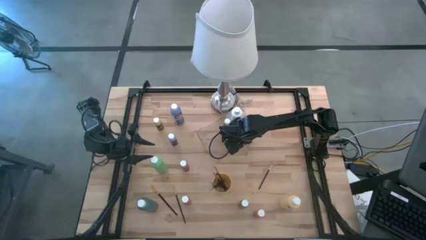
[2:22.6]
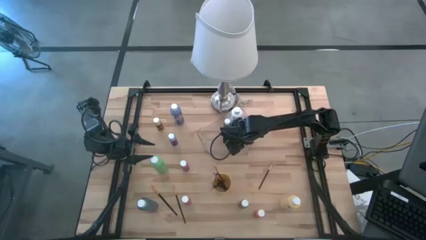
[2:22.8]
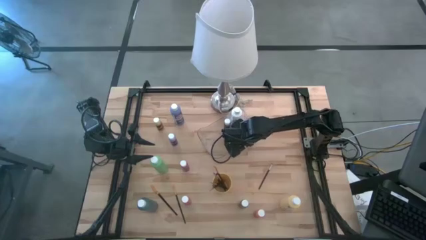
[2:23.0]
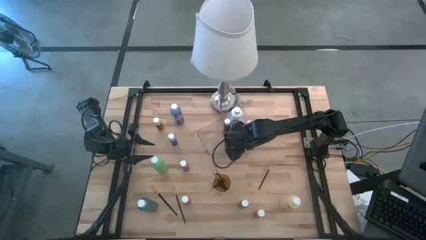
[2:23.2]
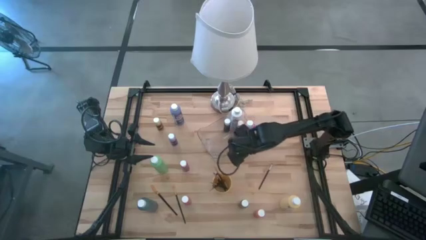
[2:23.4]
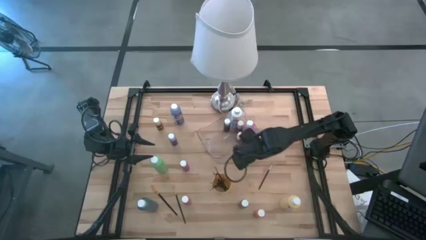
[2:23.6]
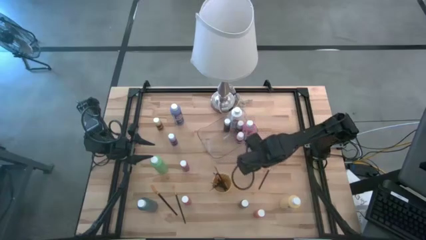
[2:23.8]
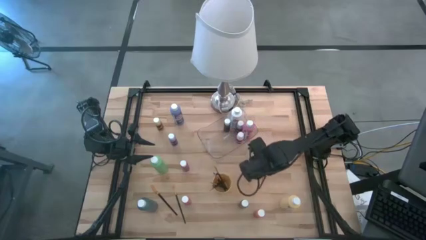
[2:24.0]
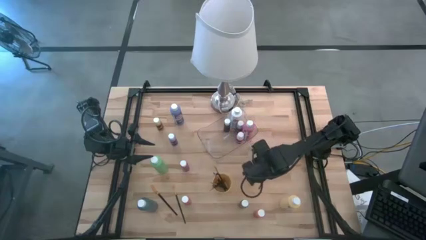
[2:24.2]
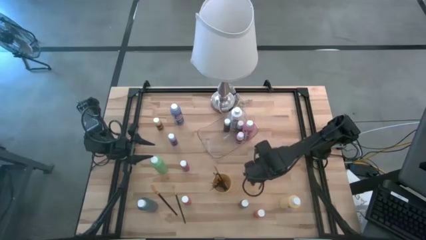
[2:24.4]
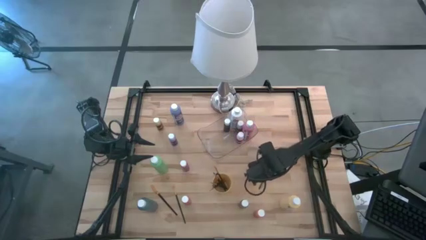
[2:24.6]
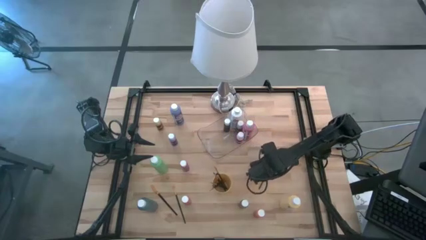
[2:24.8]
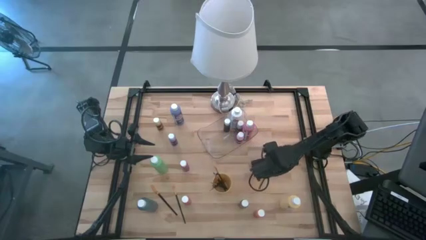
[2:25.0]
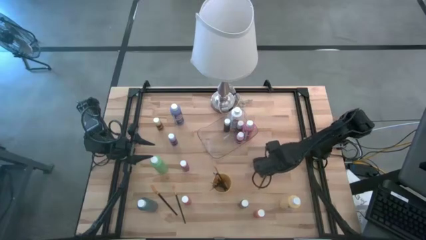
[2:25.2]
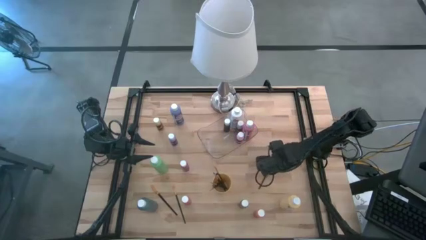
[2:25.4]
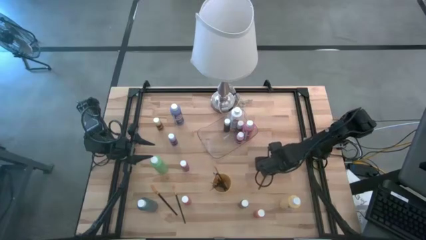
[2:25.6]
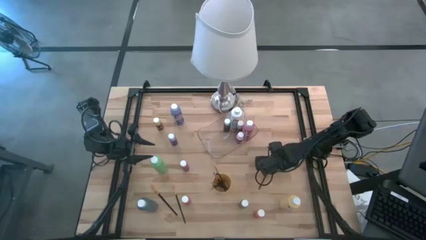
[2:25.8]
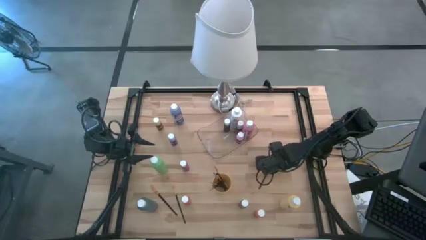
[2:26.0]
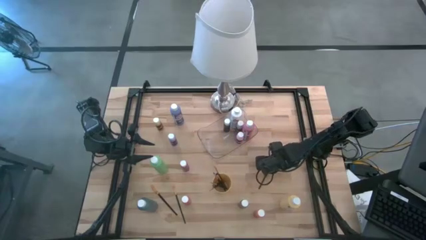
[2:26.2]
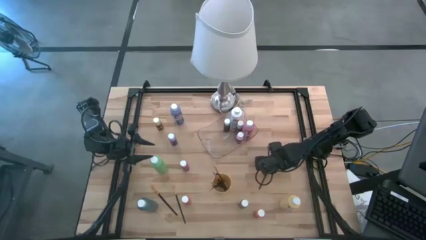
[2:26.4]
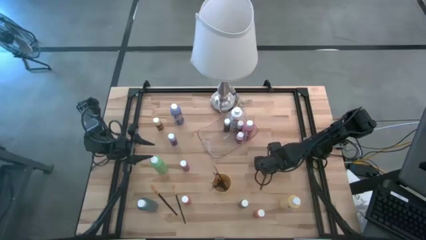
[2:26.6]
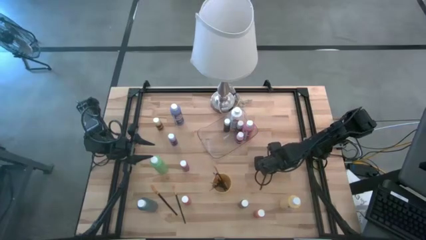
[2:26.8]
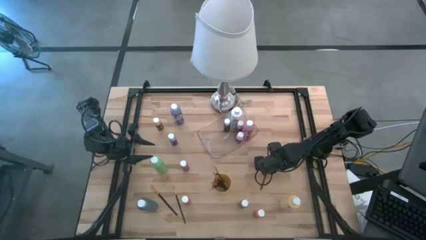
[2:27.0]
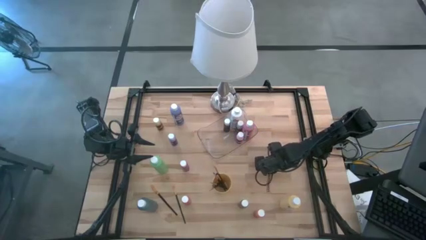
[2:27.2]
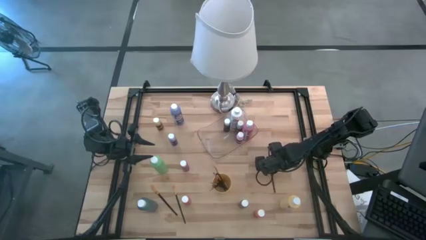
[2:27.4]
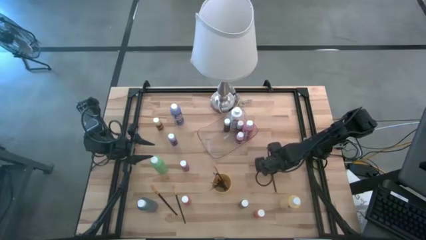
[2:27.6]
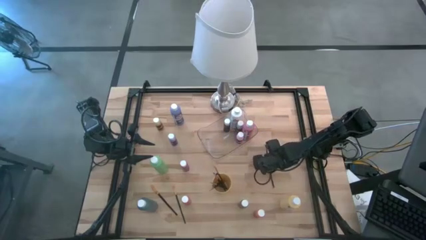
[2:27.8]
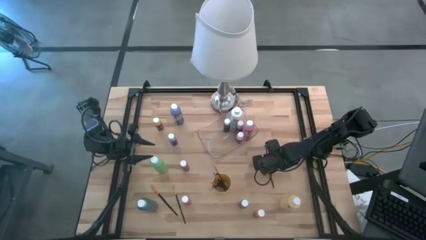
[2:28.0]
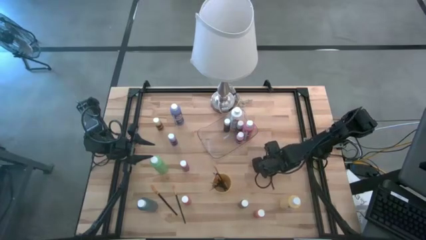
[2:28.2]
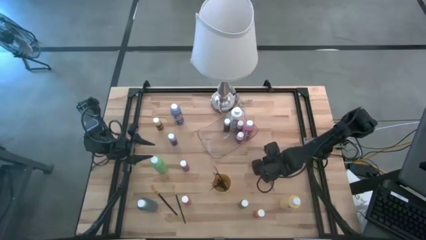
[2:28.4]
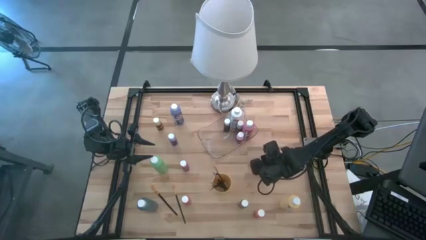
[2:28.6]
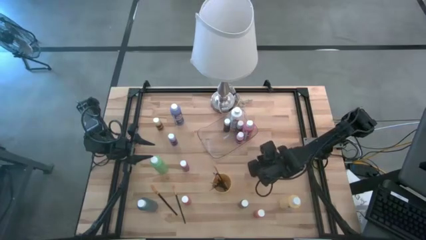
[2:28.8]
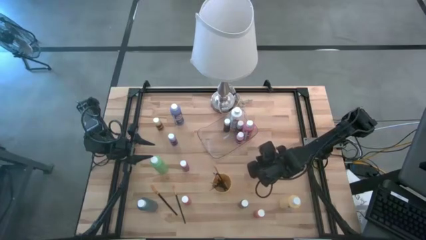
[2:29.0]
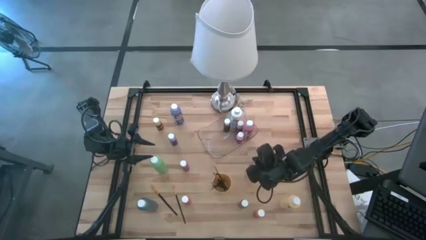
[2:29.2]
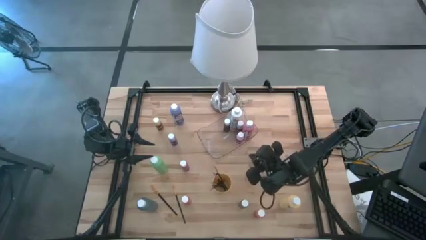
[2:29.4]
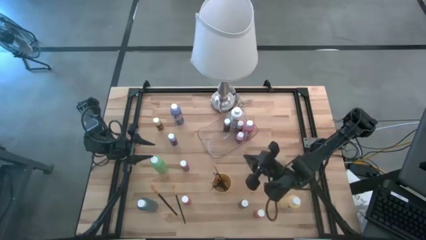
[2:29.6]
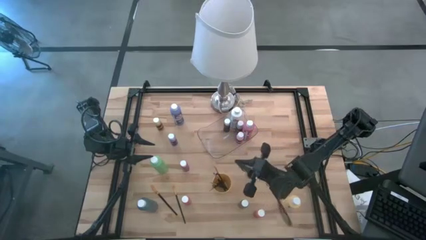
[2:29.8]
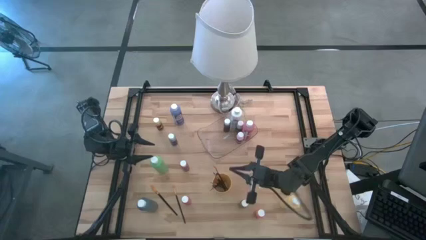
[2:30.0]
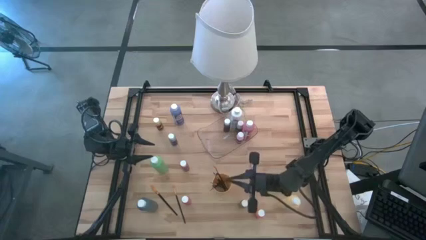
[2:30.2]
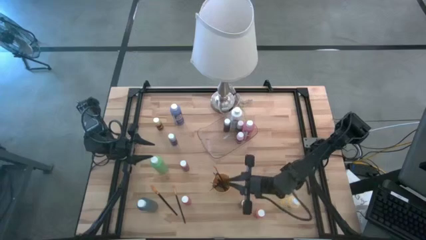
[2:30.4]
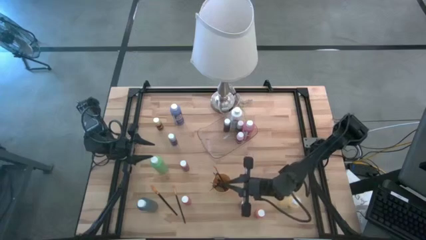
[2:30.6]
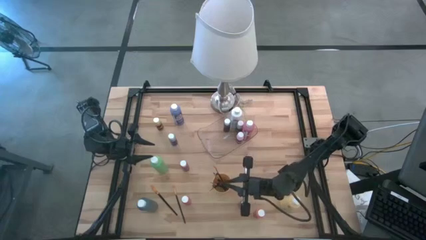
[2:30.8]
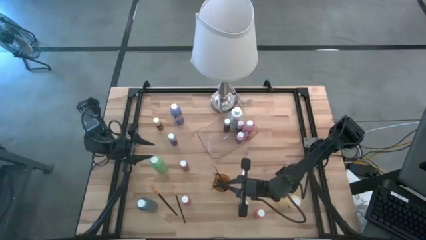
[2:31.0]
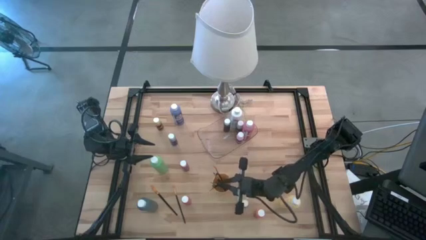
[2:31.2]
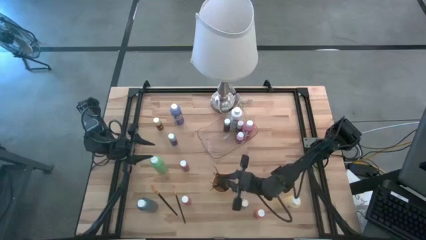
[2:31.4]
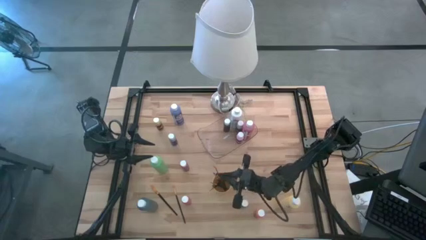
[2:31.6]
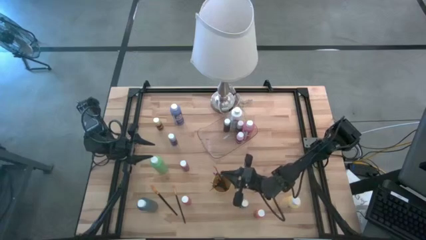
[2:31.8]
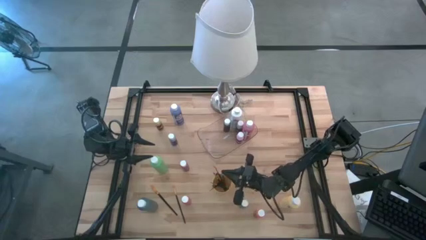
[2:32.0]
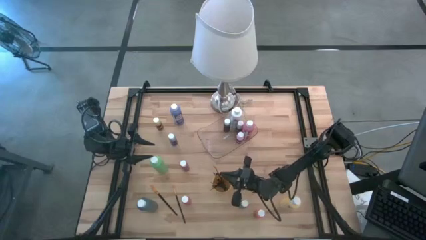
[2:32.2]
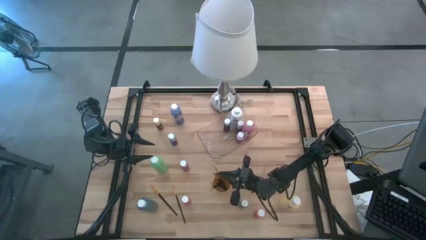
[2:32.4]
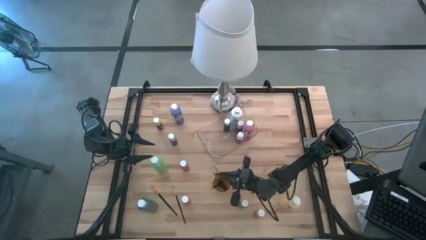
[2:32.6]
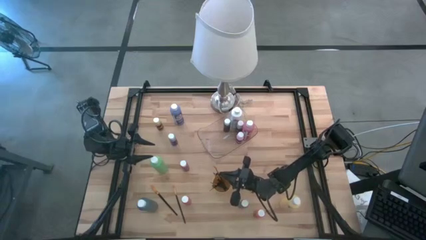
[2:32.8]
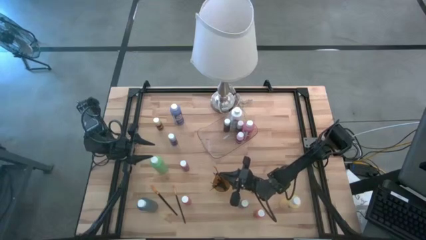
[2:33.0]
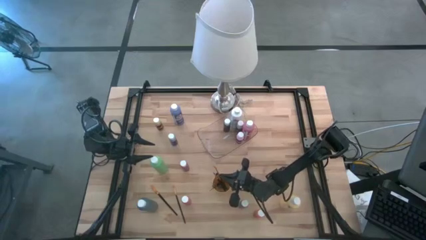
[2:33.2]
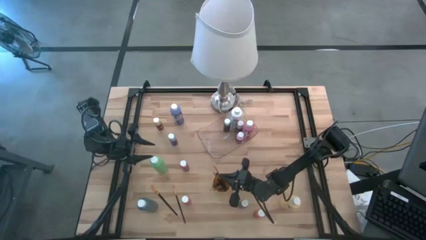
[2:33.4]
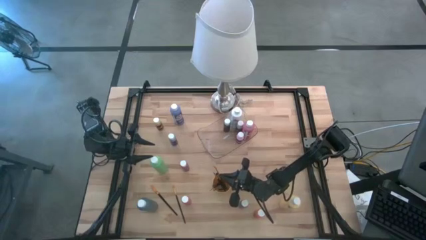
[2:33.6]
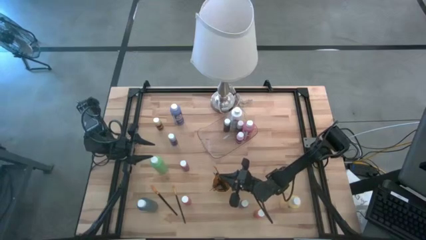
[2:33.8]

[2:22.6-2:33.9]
Task: Pick & Place Paint Supplies
Put the black paint brush into the yellow cup

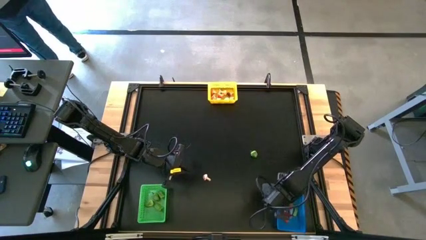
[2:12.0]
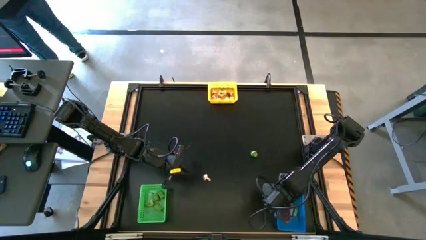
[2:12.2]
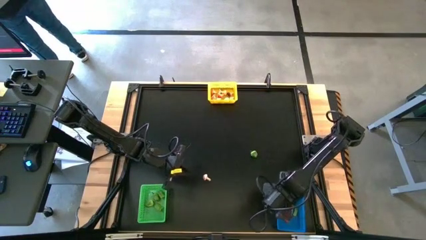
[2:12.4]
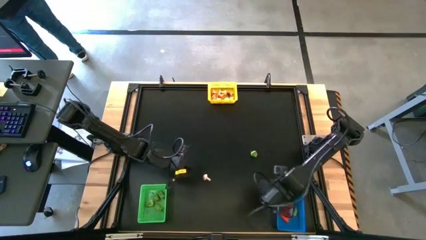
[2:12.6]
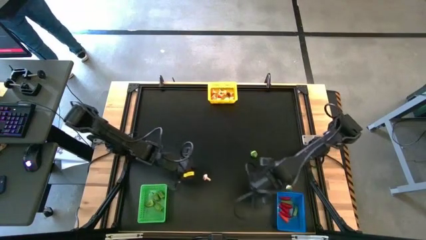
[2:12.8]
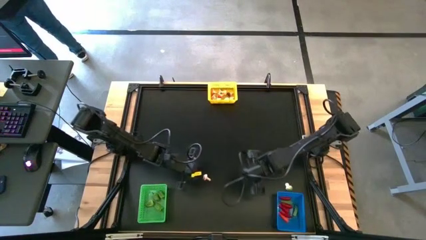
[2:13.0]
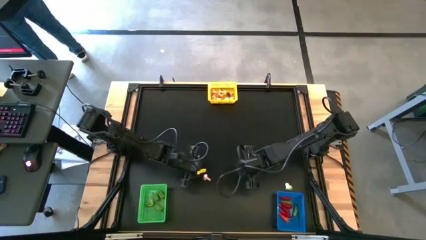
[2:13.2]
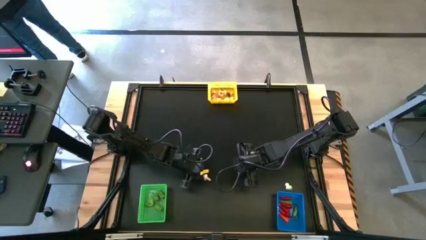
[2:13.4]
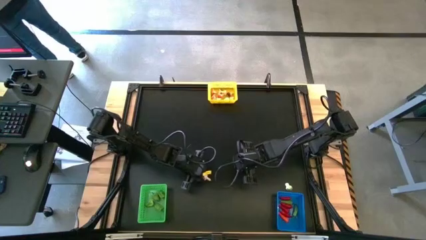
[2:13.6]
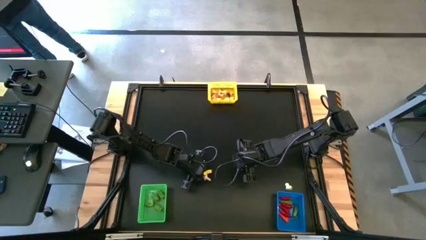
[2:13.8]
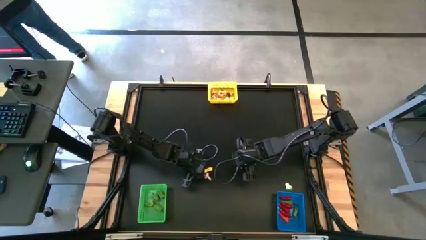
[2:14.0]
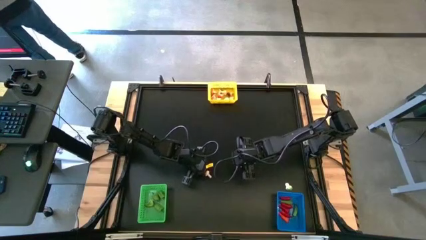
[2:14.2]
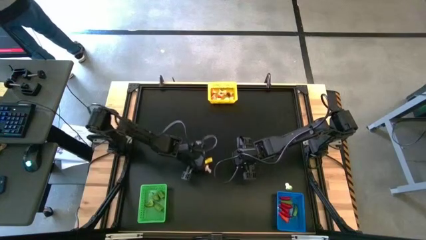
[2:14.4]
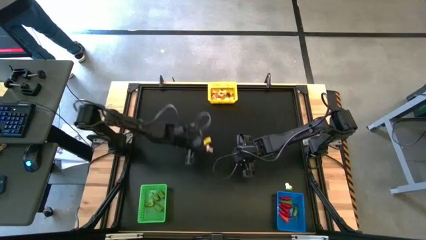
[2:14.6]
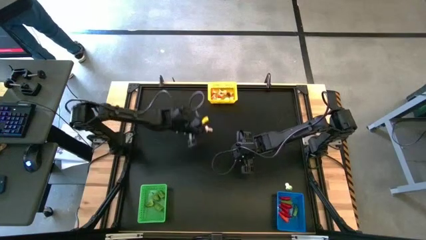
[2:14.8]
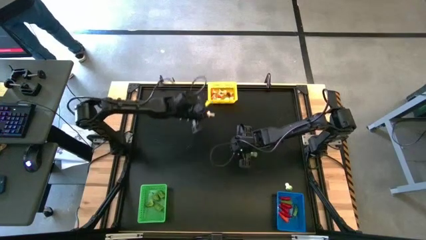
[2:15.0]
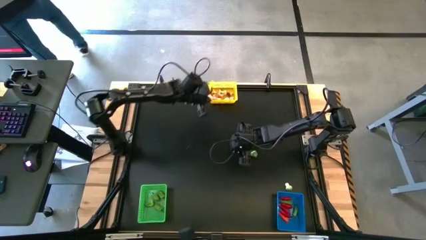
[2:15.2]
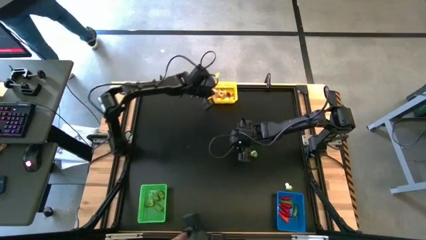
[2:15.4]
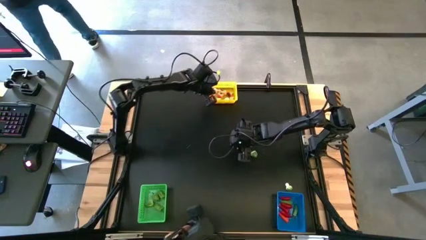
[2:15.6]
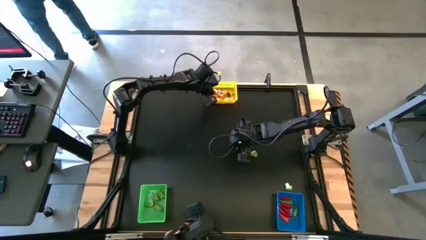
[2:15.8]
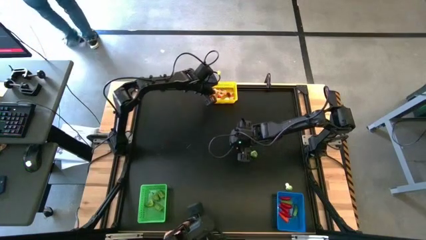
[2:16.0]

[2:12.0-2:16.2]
Task: Sort produce into baskets
Put the left brown mushroom into the yellow bin
